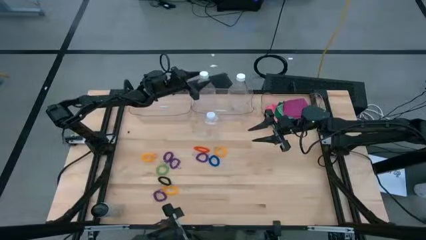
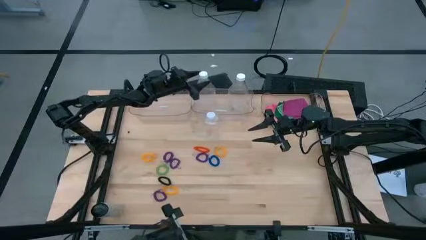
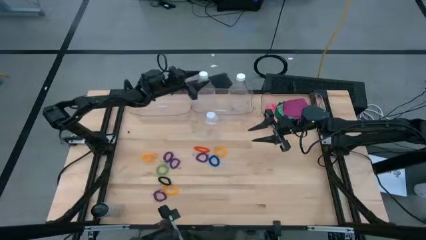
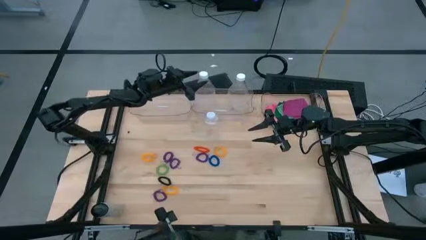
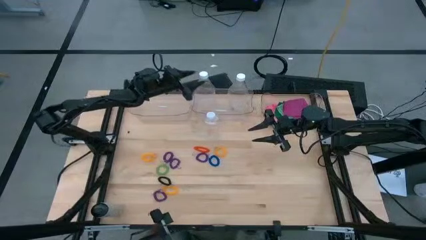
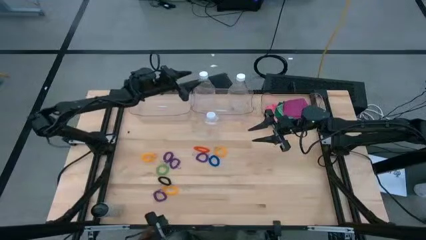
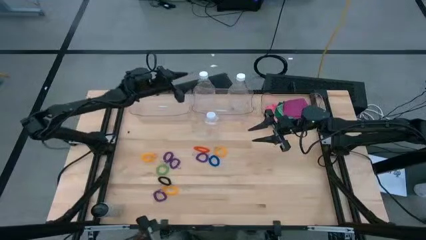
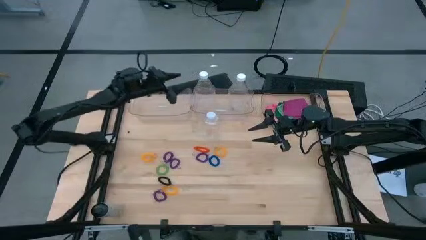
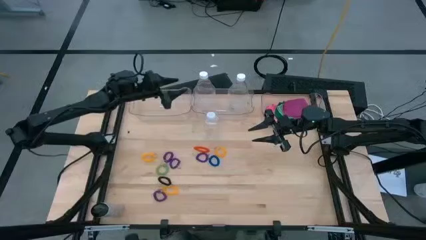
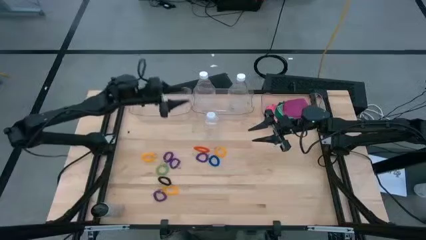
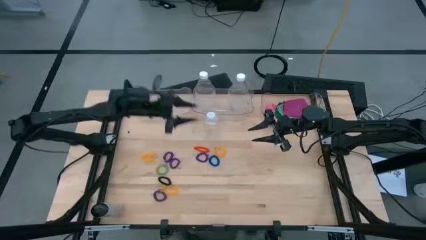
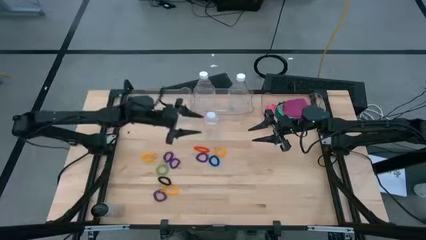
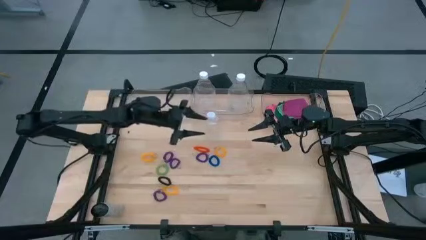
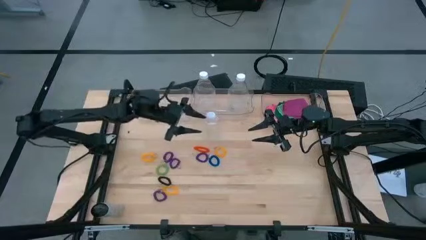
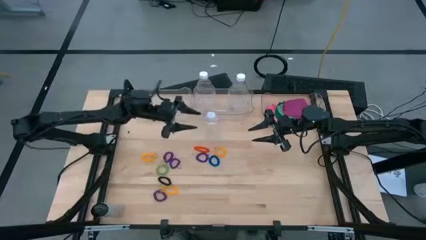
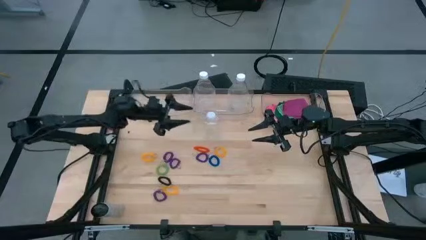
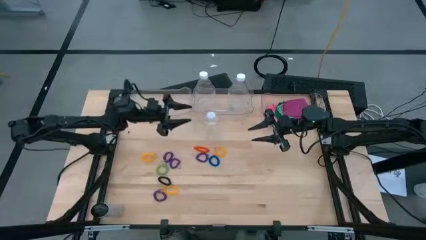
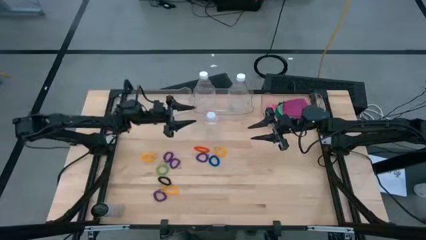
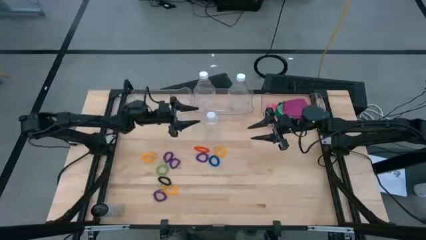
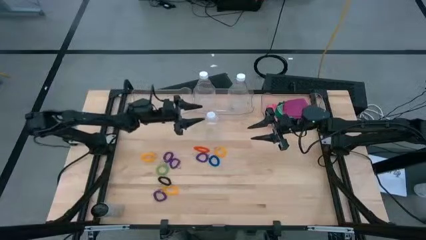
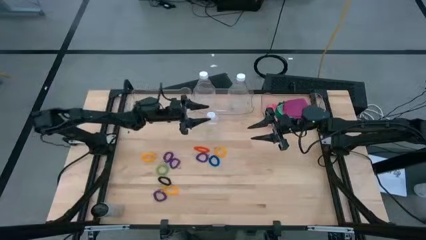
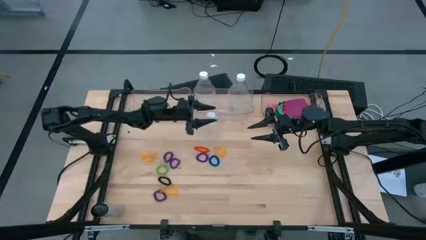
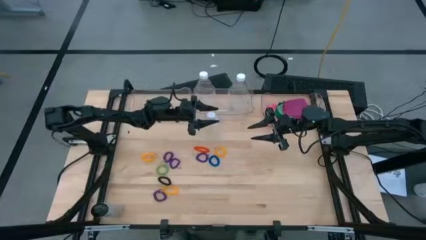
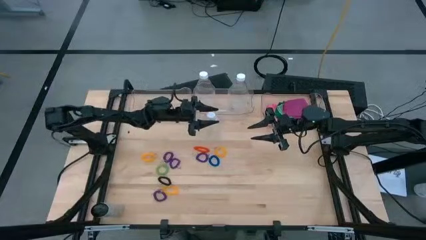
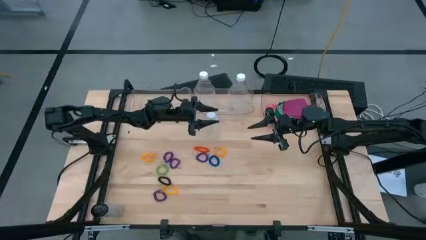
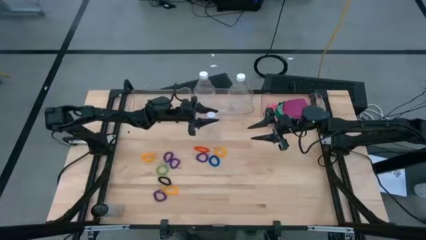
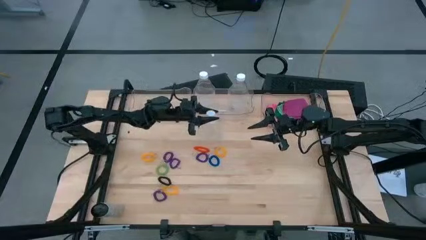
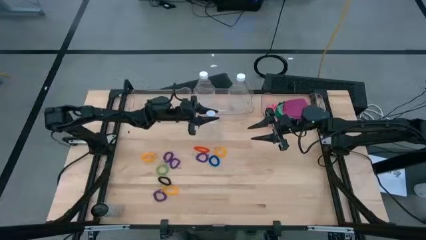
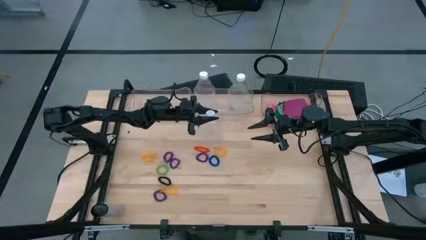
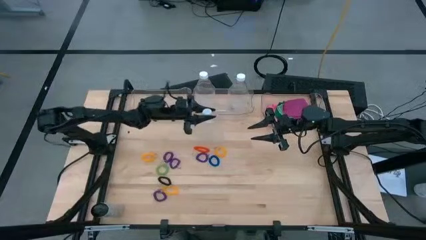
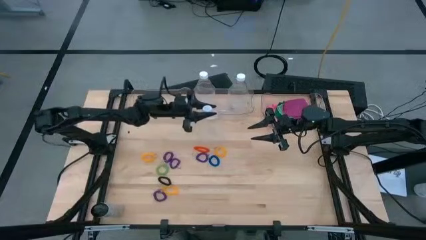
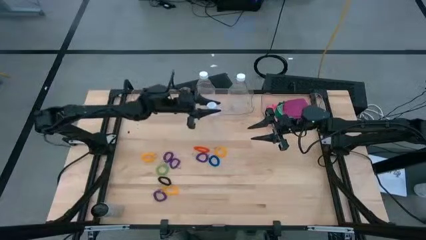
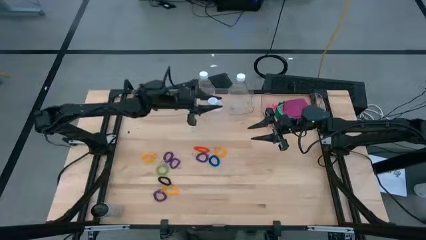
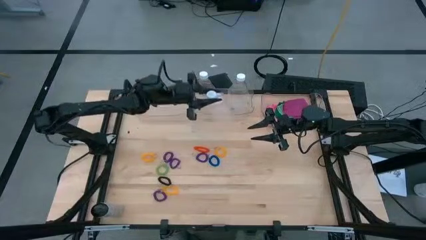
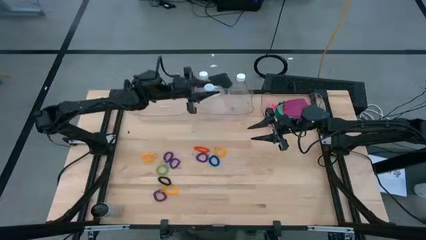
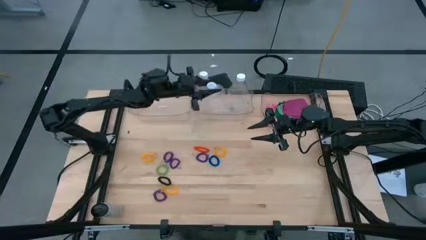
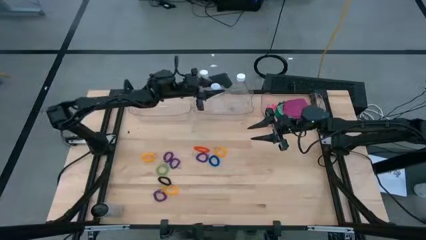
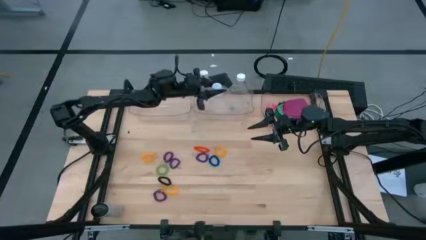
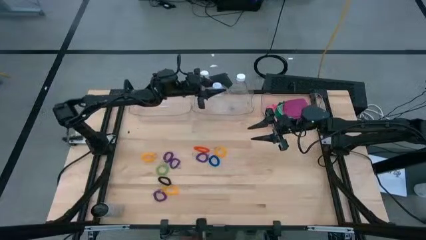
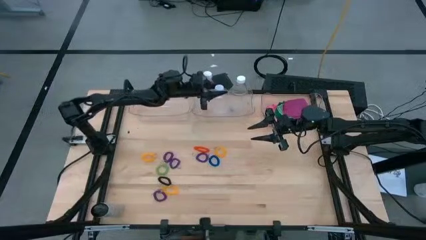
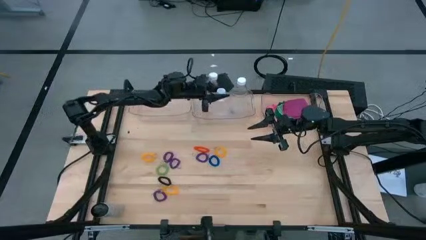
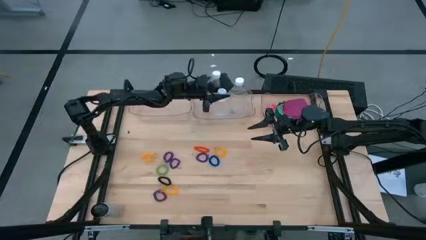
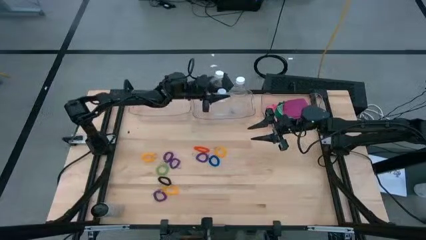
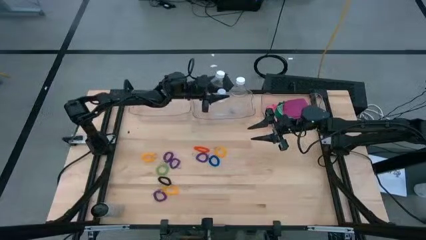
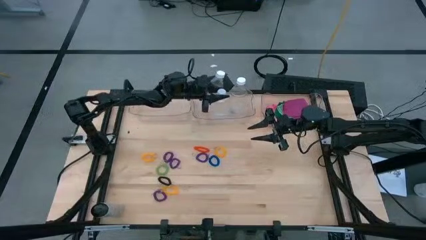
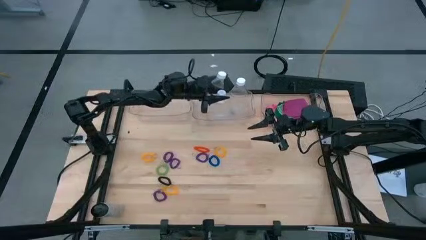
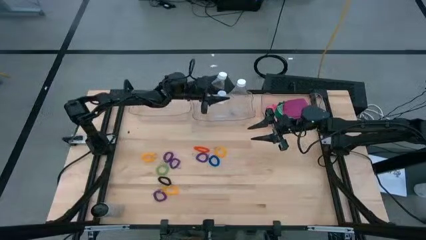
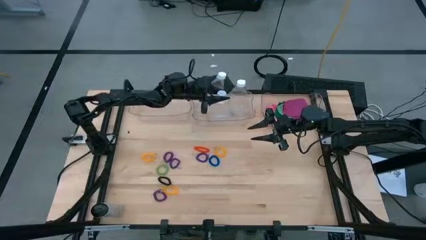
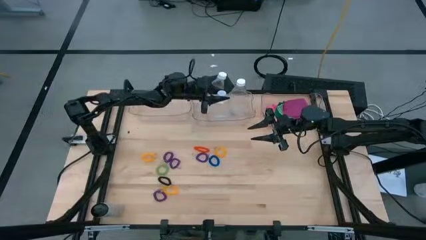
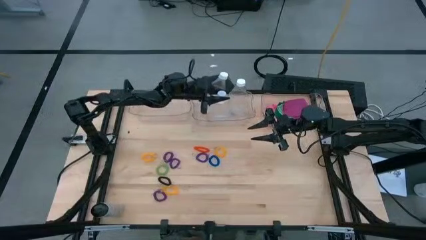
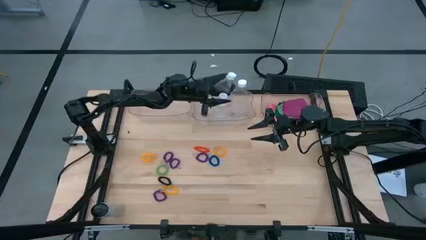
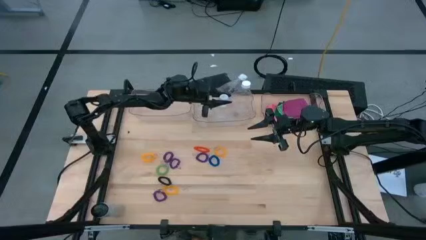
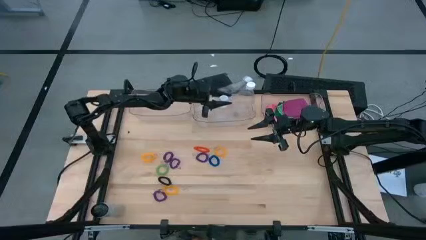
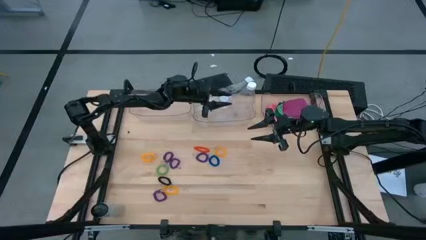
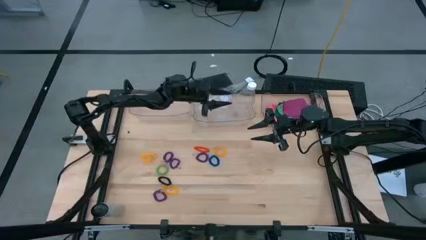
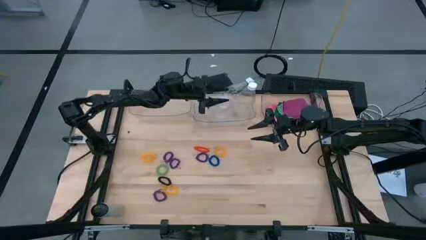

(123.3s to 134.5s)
Task: Pick & Place Sports Items
Put the plastic bottle into the middle transparent bin

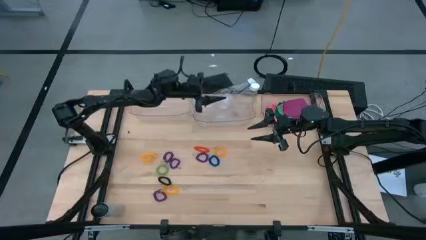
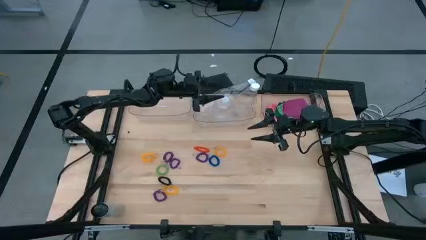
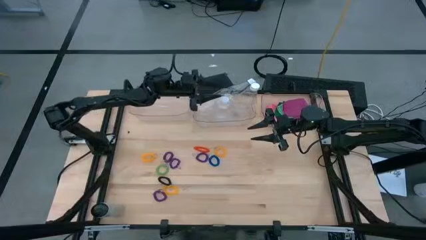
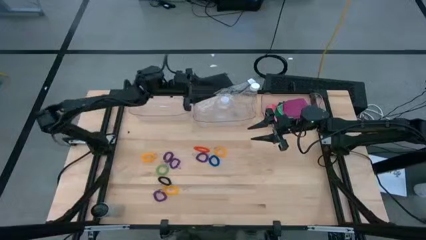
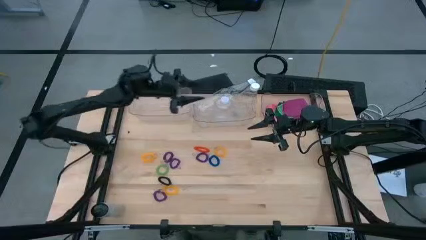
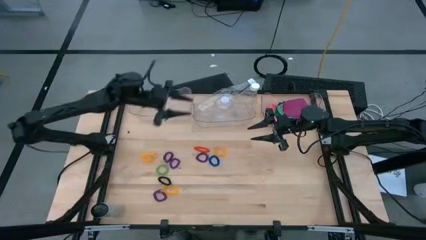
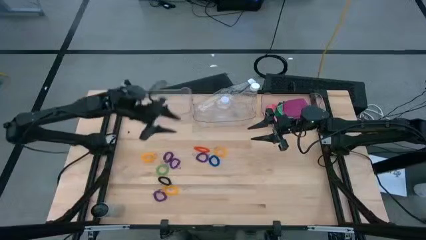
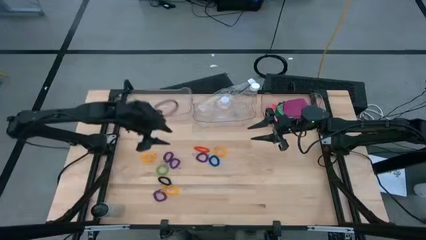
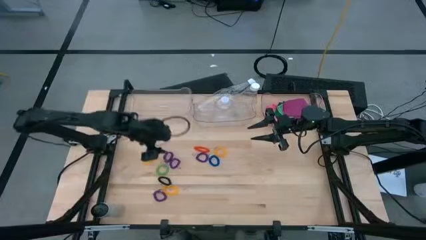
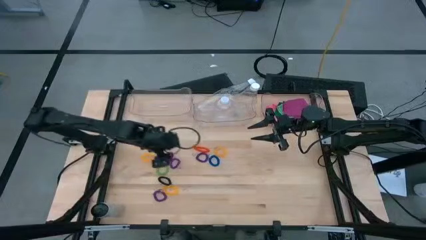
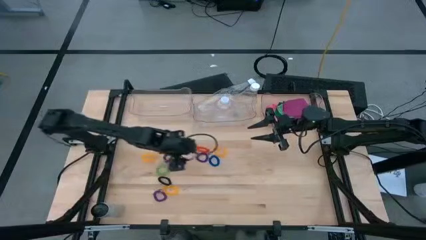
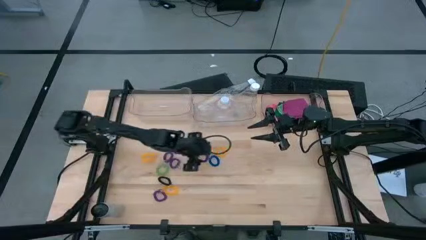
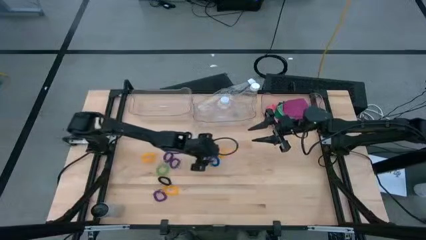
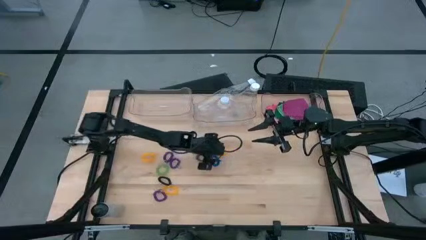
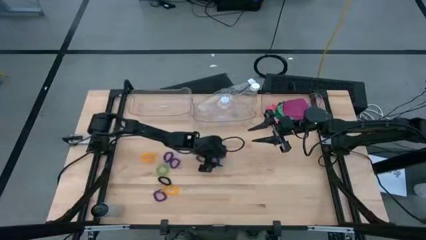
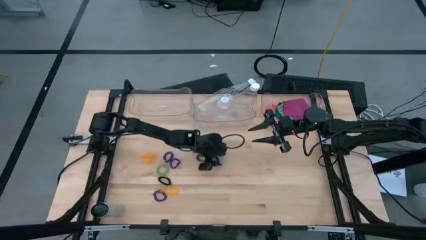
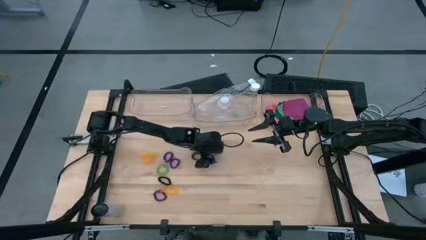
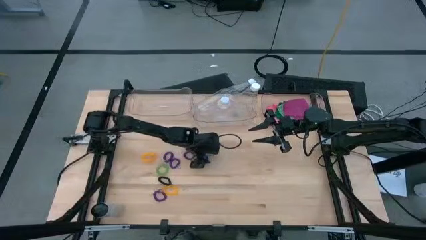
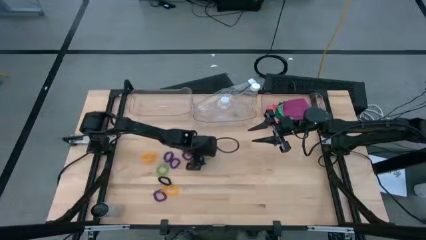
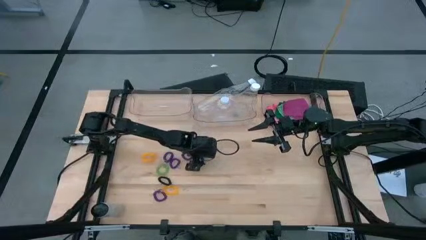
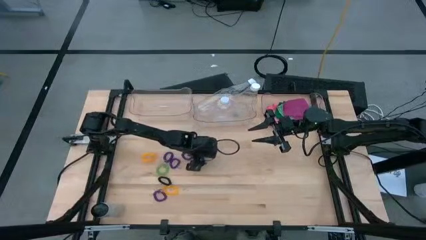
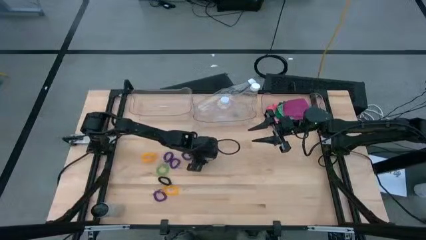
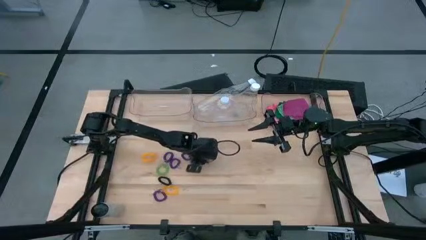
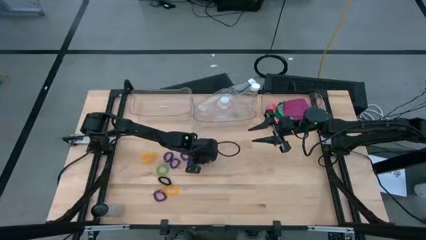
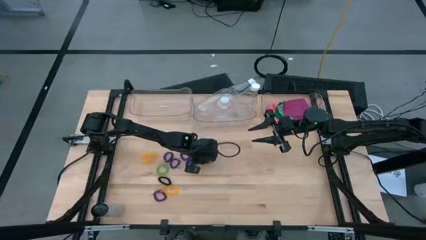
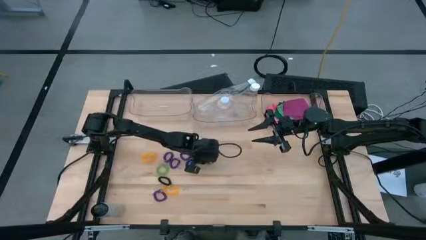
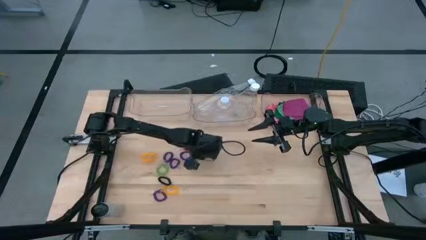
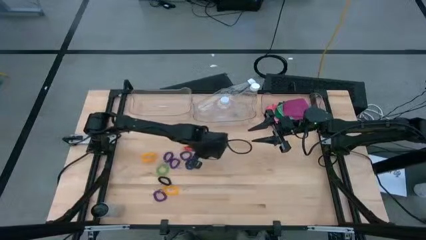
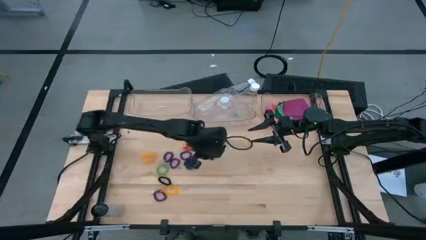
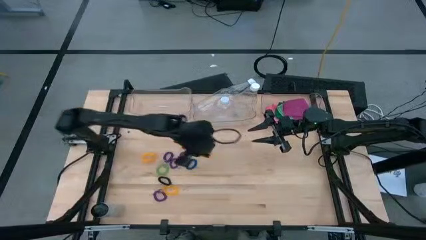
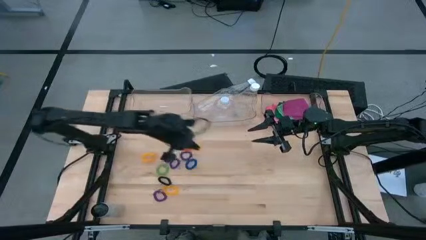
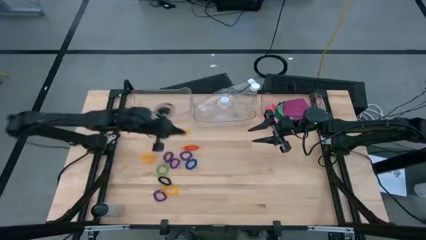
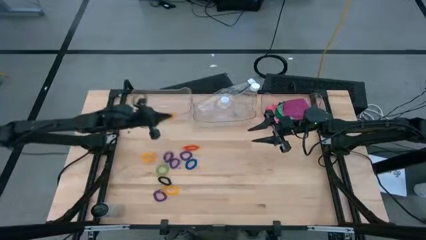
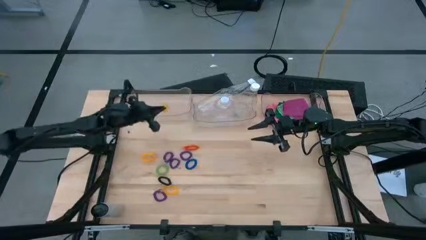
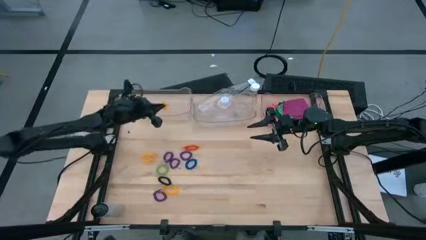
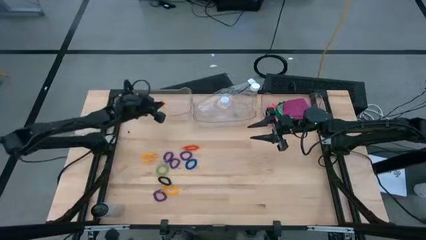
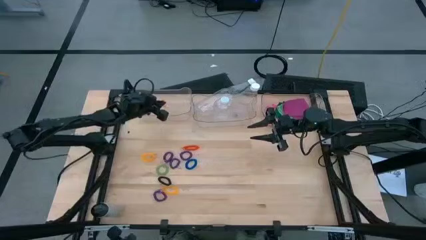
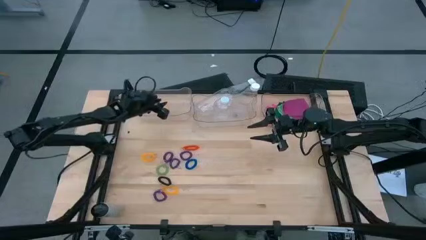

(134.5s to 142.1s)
Put the top right yellow spring keychain into the left transparent bin
